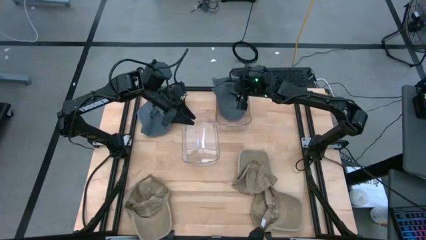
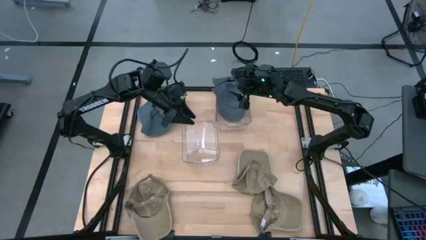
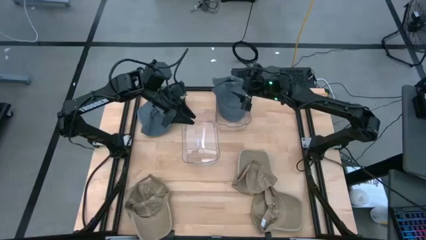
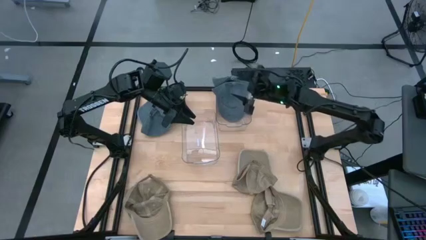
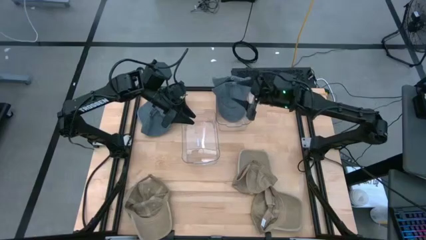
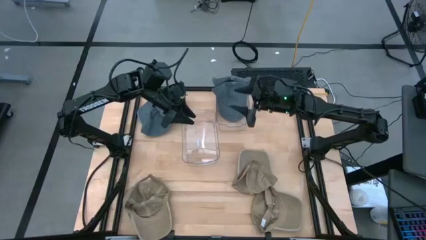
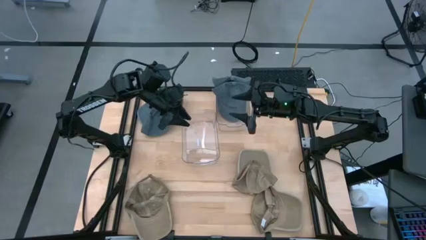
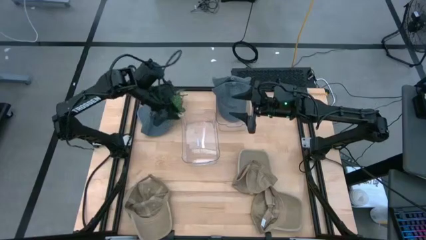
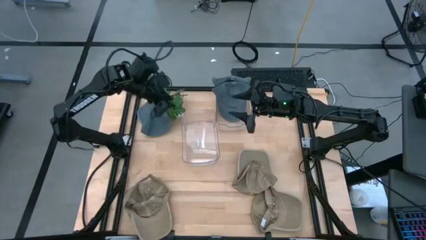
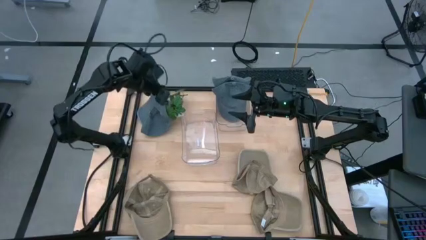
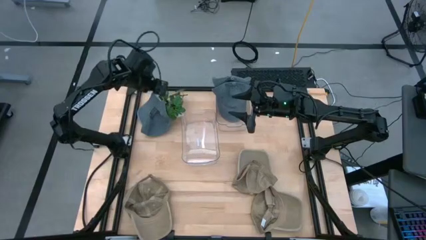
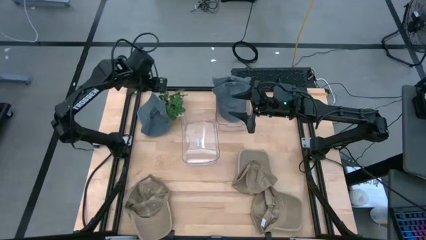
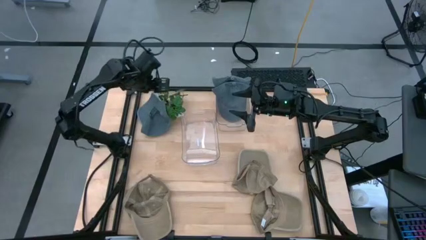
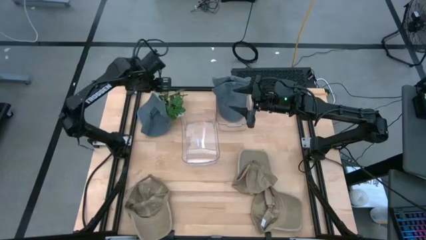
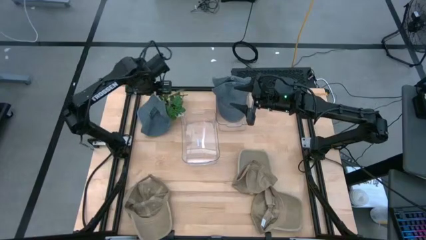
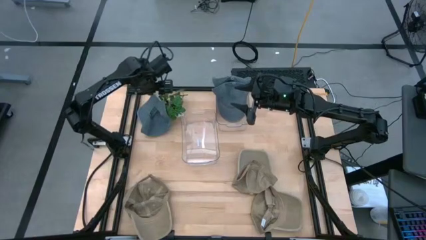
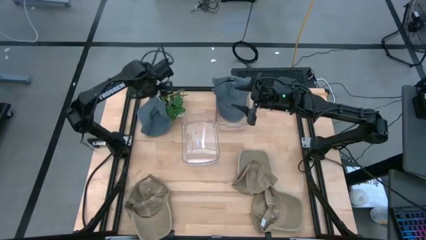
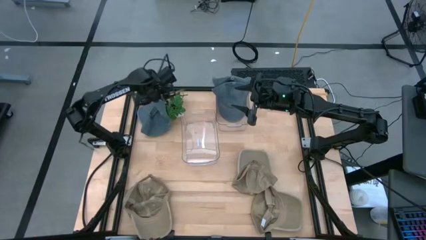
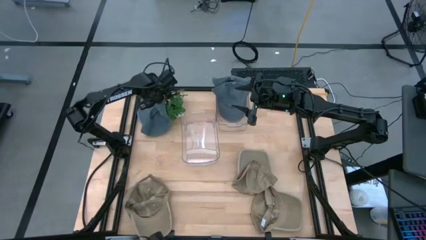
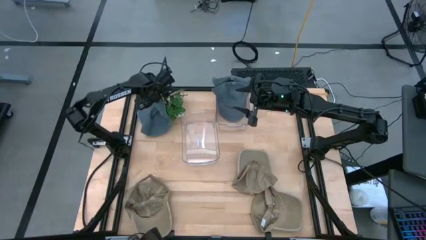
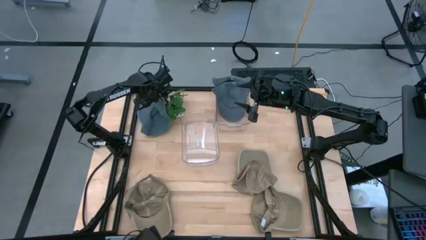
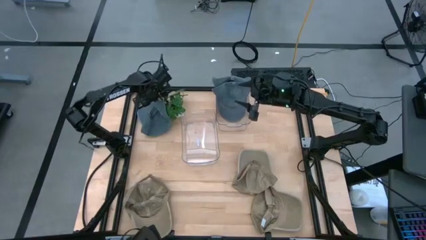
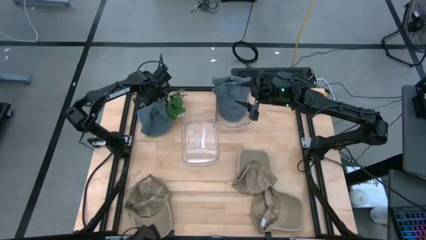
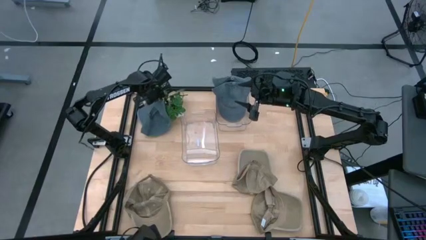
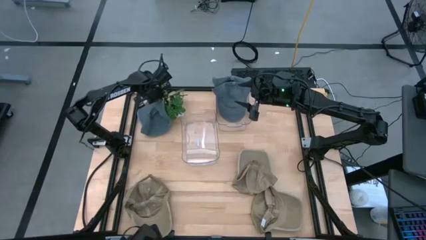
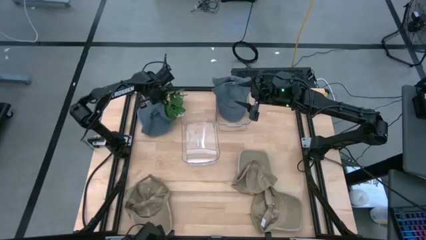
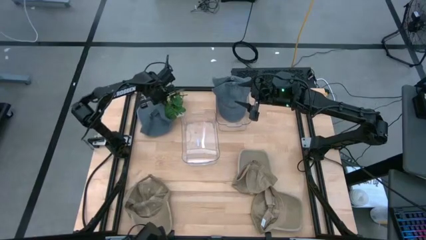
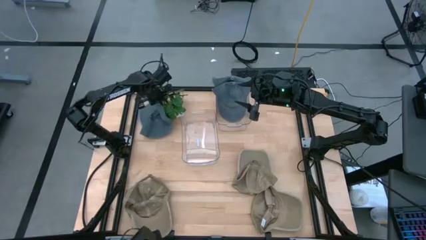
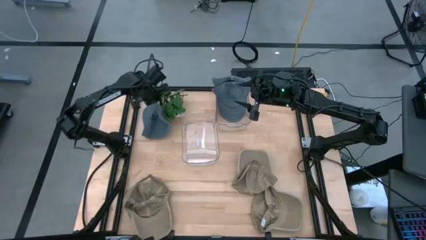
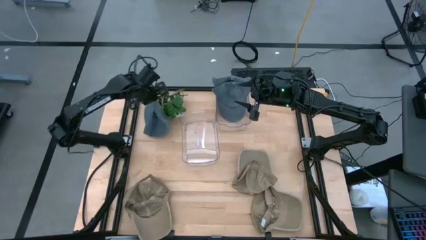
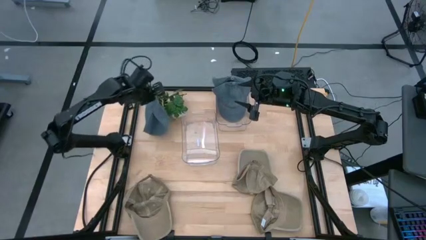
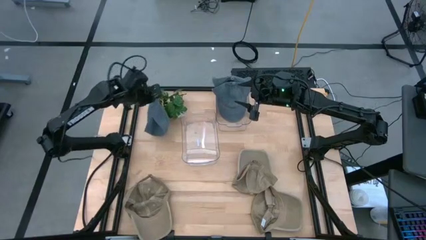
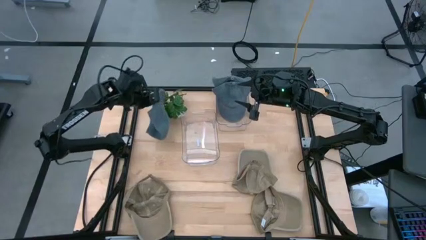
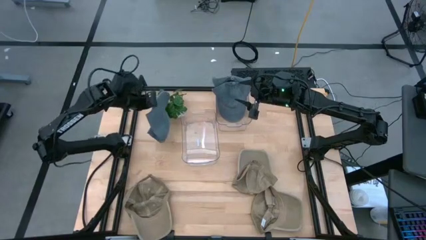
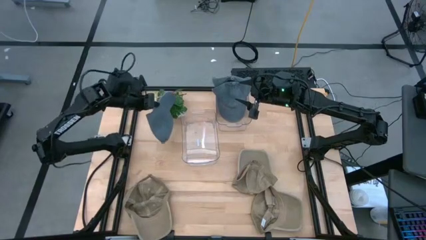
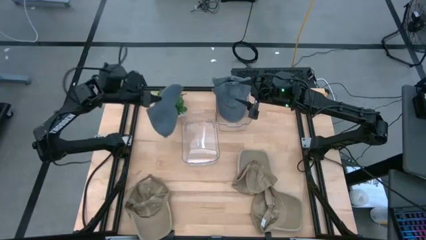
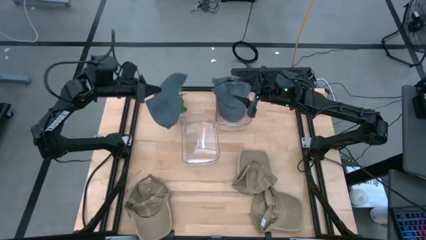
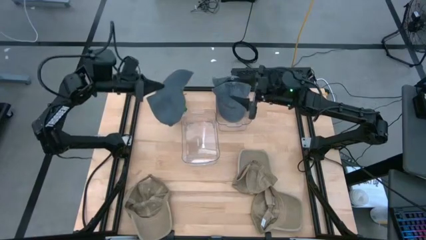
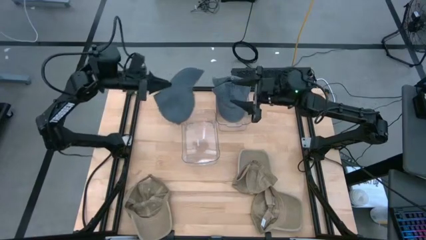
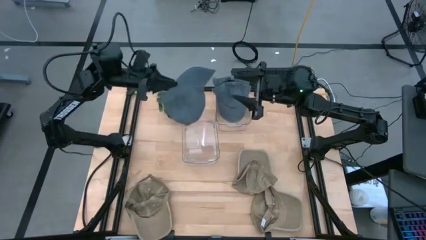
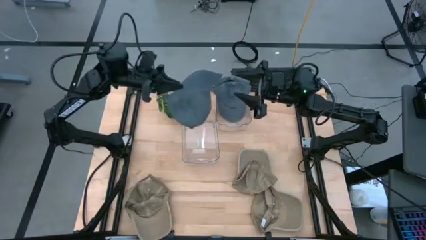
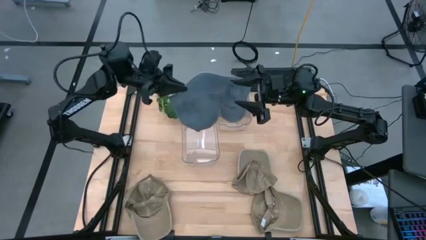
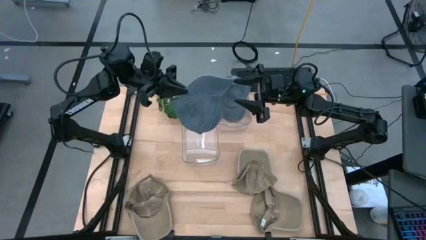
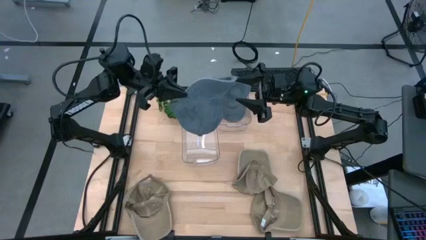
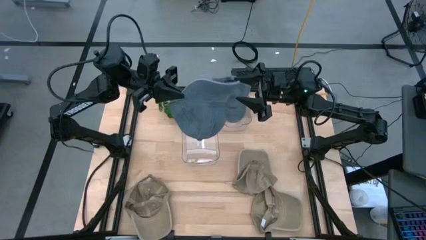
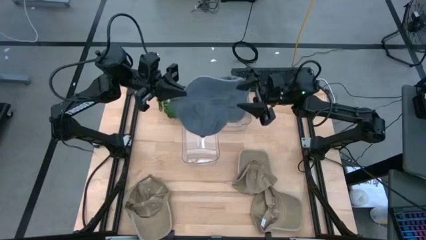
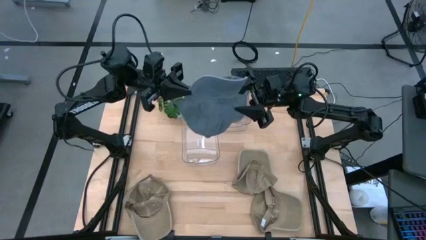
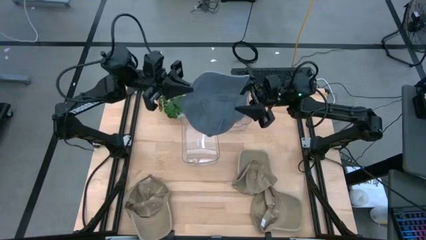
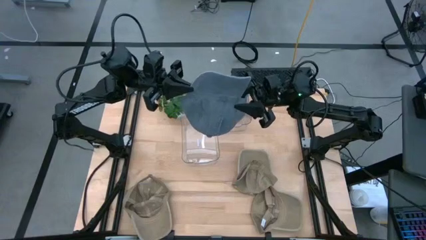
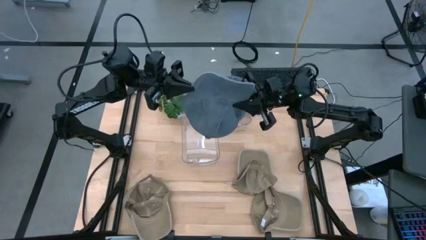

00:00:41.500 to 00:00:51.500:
Task: Pick & Place hat
Put the ash blue cap into the right transparent bin

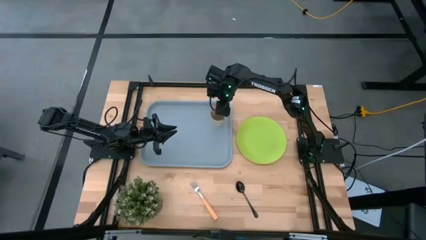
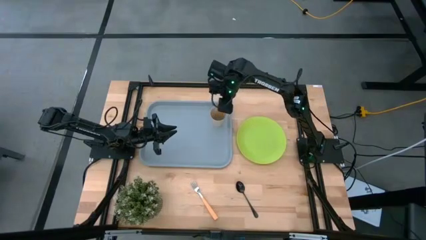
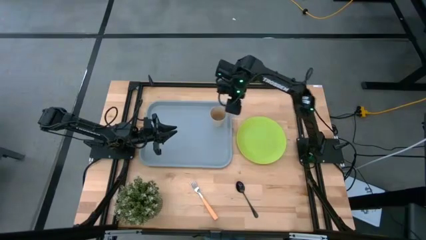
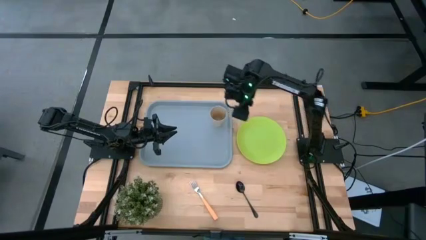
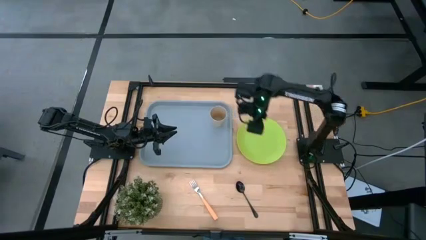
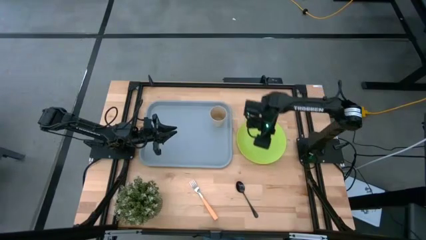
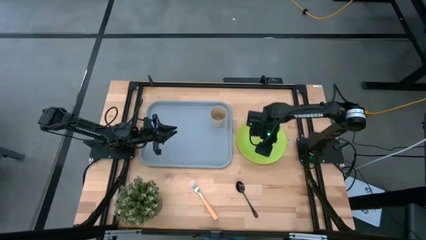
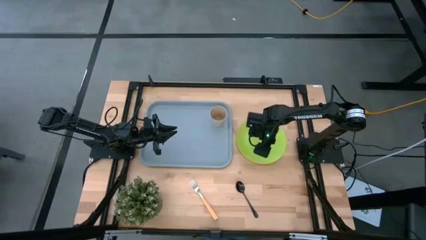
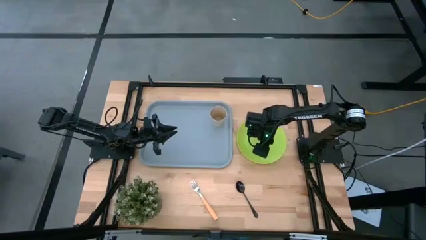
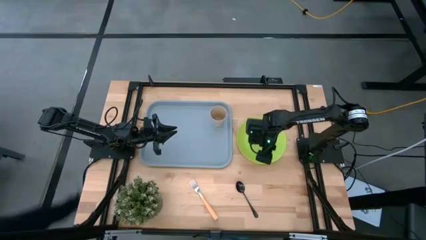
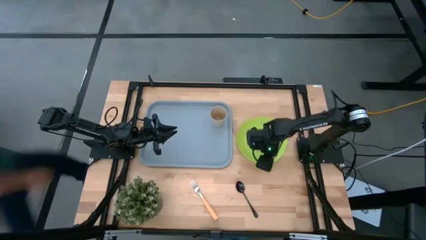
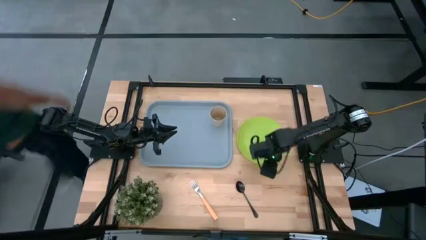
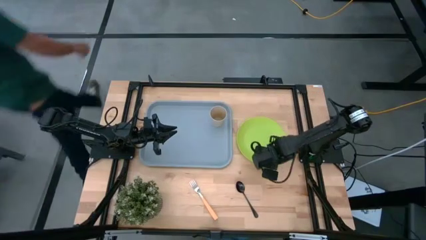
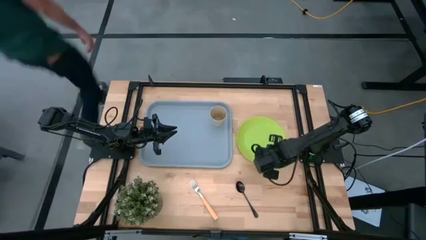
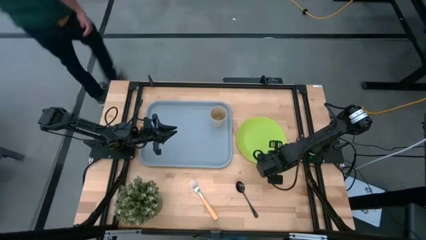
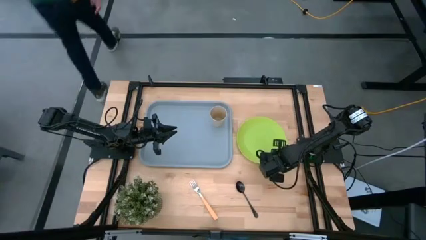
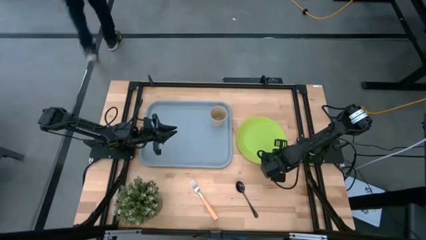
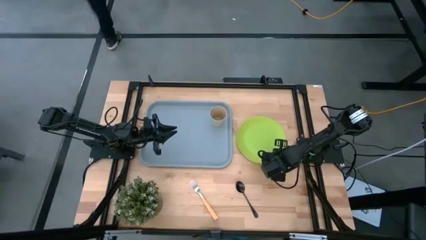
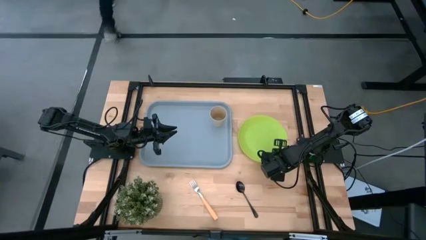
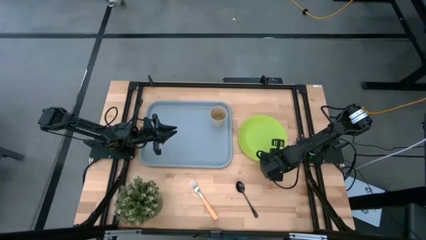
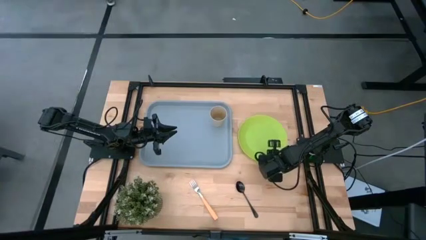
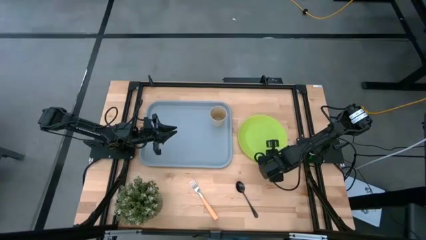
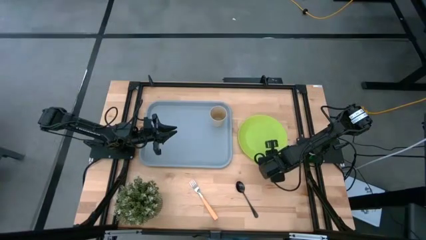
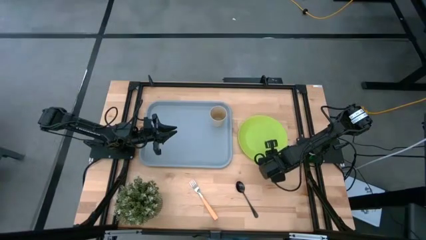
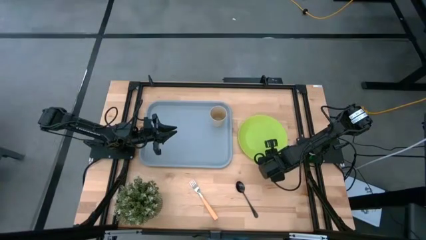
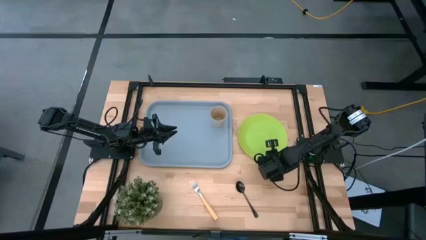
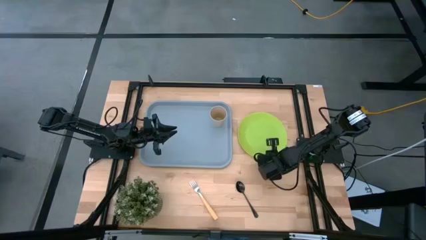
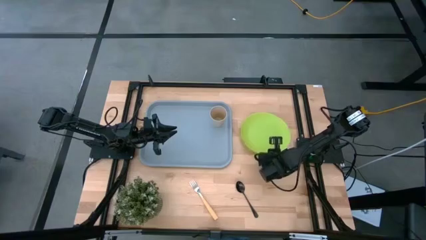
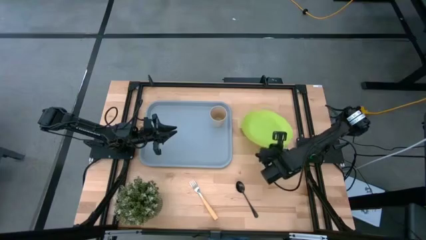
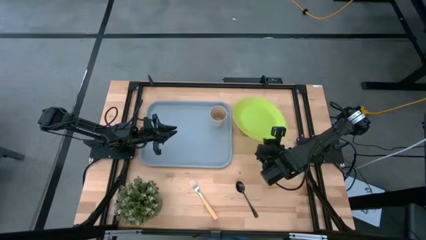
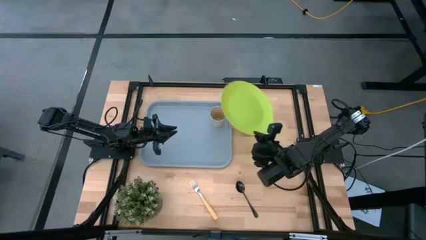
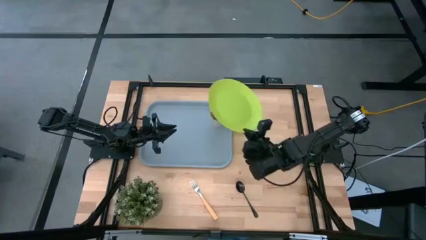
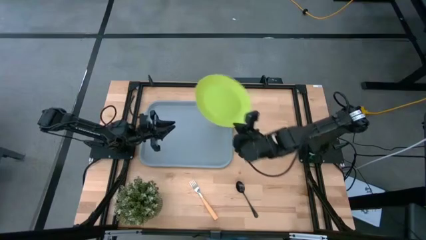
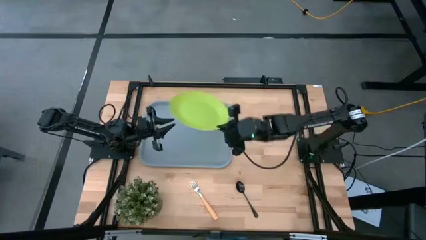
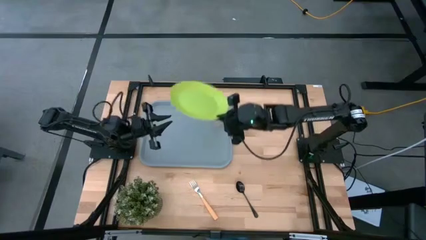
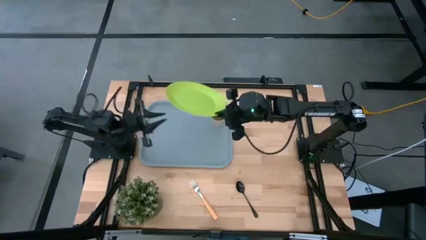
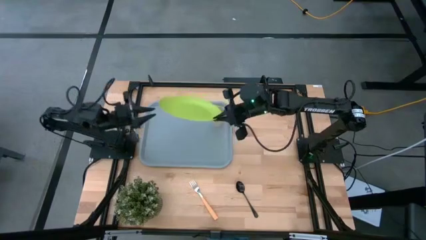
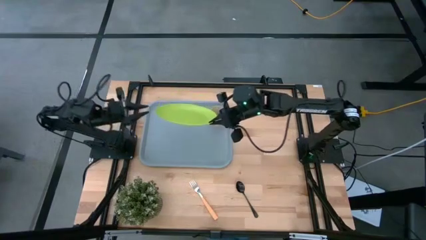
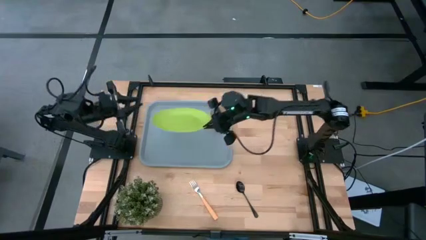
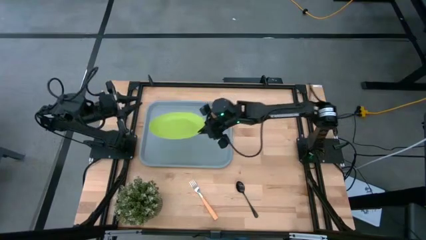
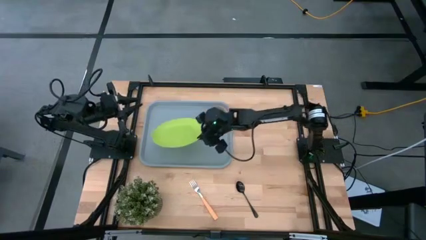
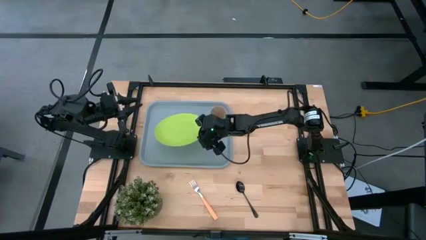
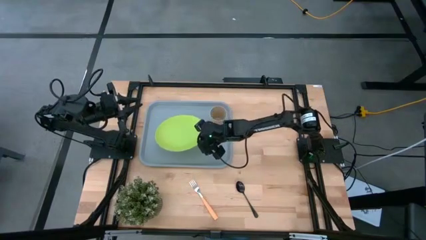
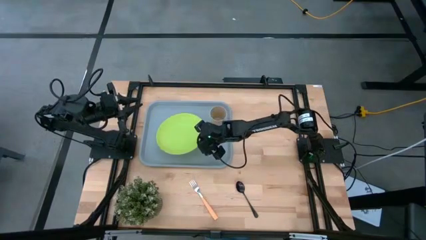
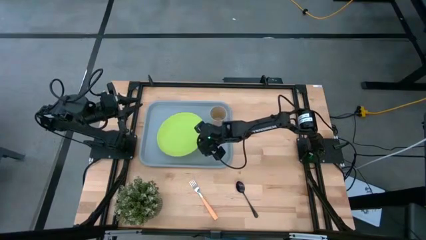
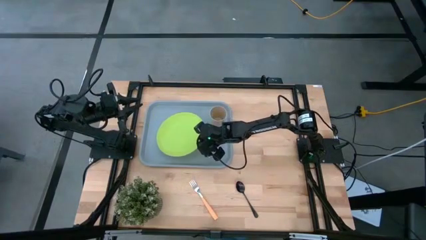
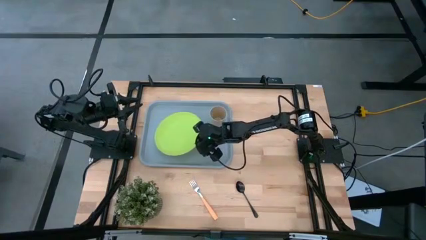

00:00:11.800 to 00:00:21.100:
Task: Pick and place plate/cup/fork/spoon on tray
Put the green plate on the gray tray to the bottom left of the brown cup
